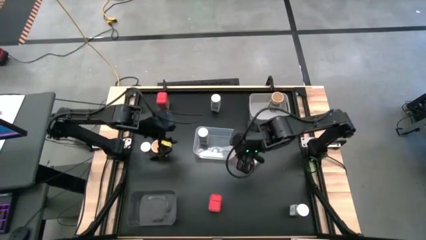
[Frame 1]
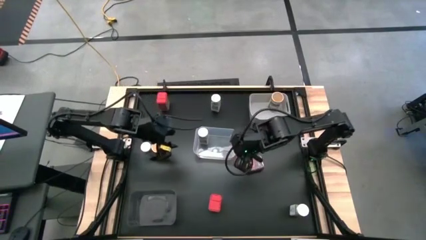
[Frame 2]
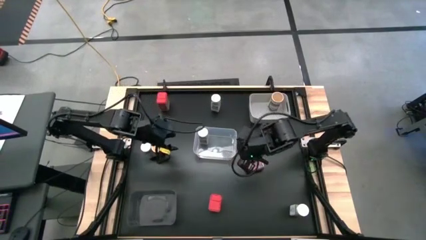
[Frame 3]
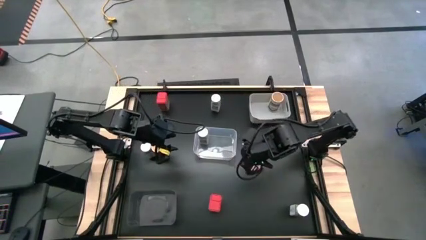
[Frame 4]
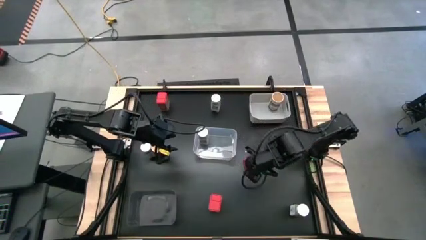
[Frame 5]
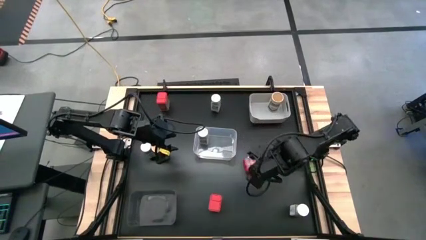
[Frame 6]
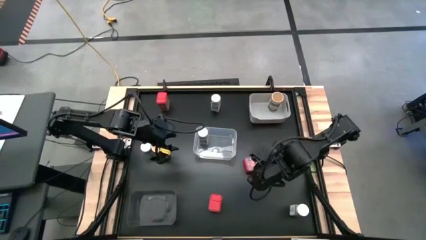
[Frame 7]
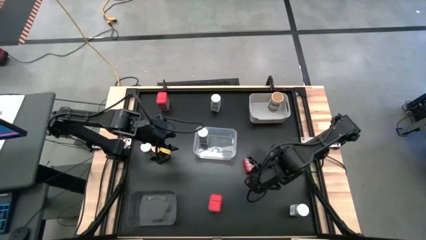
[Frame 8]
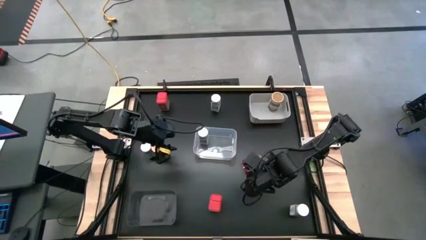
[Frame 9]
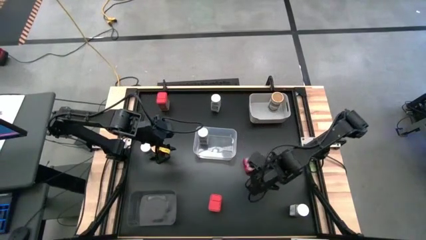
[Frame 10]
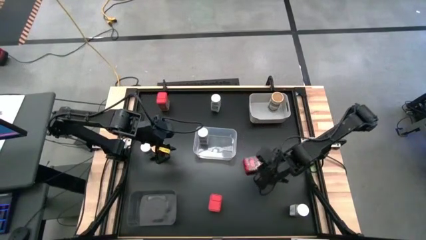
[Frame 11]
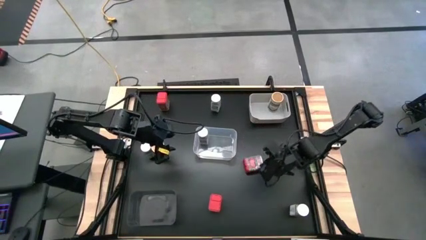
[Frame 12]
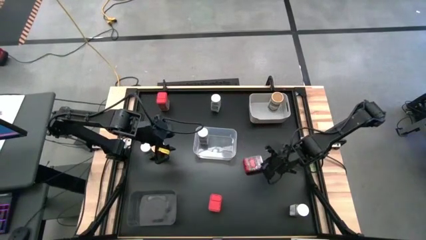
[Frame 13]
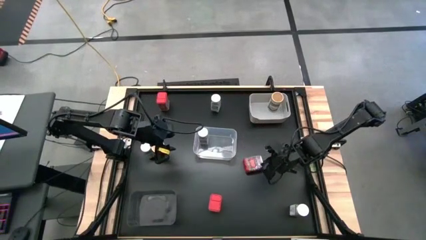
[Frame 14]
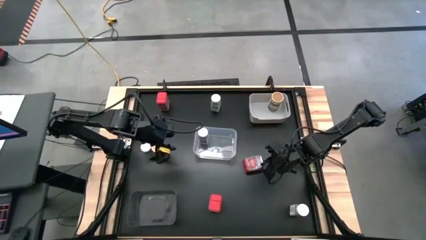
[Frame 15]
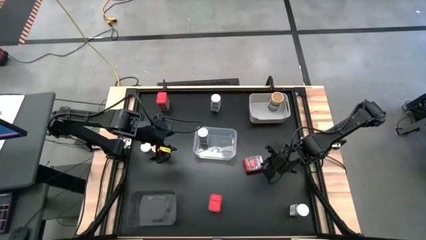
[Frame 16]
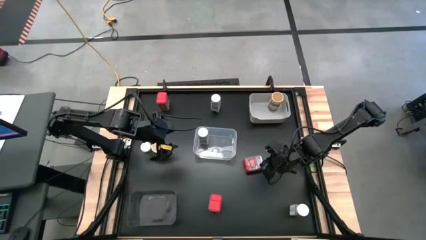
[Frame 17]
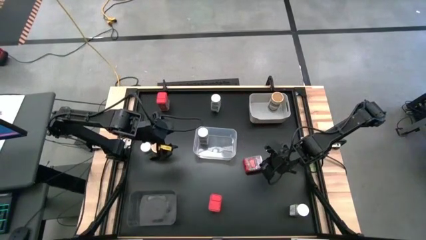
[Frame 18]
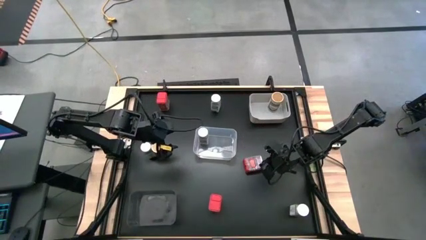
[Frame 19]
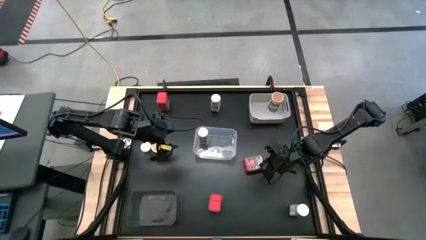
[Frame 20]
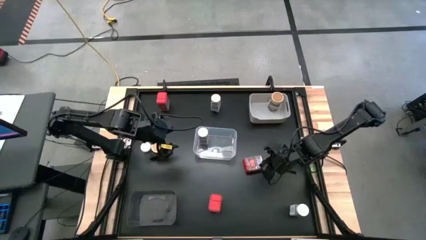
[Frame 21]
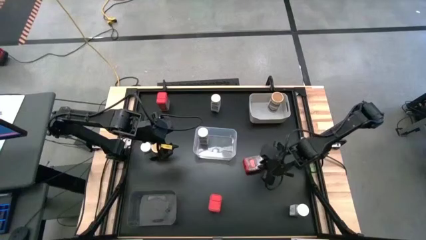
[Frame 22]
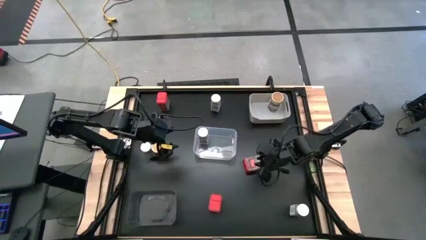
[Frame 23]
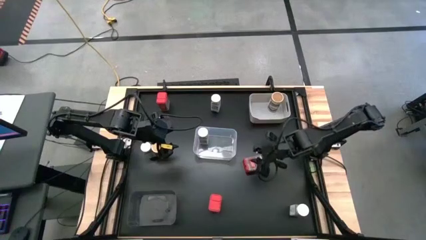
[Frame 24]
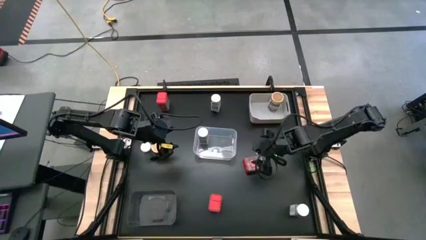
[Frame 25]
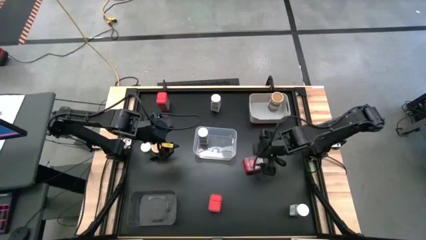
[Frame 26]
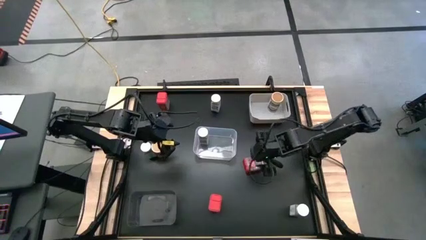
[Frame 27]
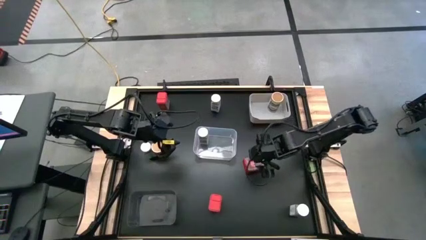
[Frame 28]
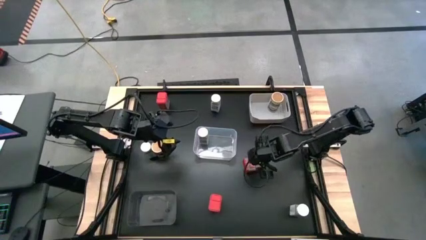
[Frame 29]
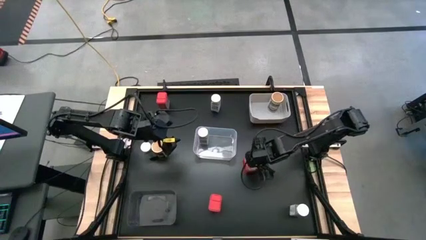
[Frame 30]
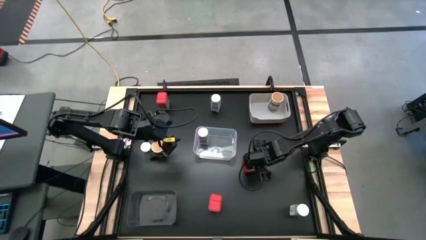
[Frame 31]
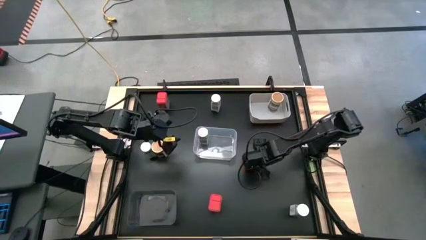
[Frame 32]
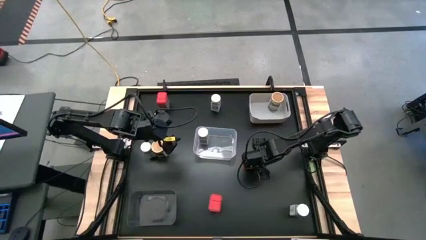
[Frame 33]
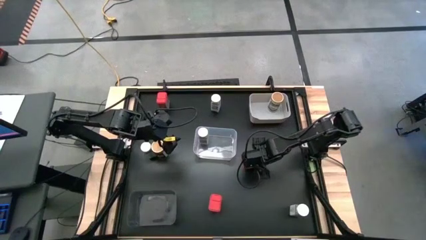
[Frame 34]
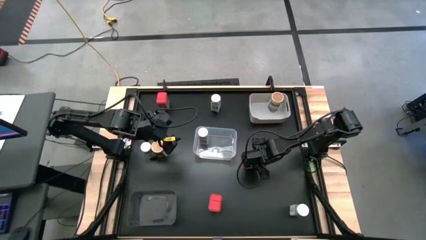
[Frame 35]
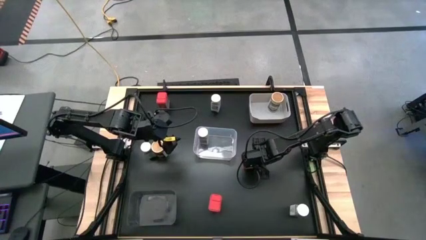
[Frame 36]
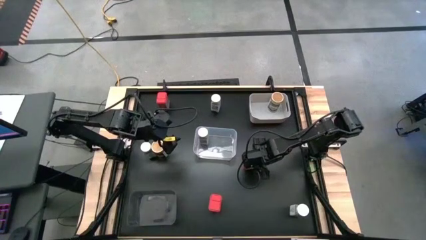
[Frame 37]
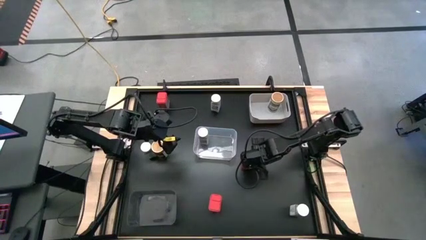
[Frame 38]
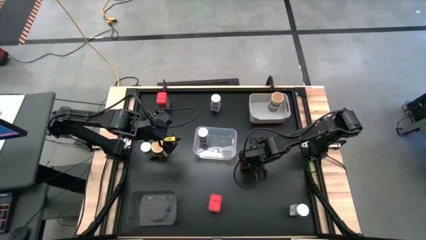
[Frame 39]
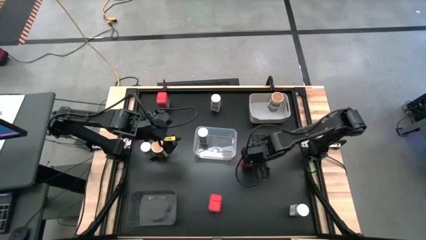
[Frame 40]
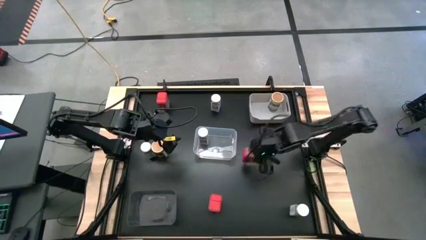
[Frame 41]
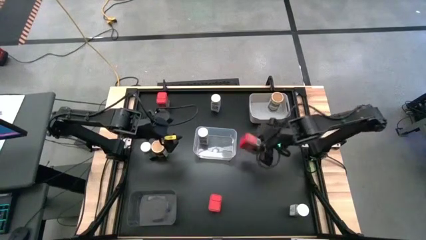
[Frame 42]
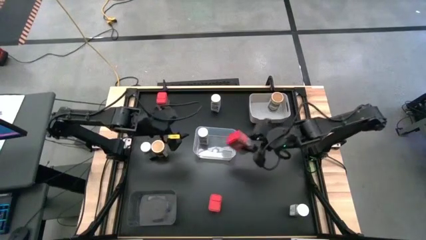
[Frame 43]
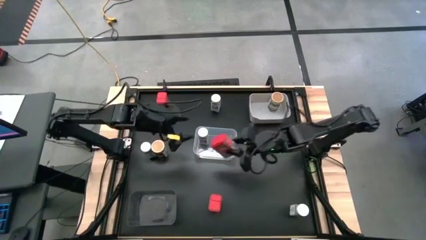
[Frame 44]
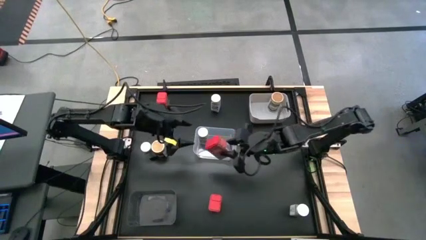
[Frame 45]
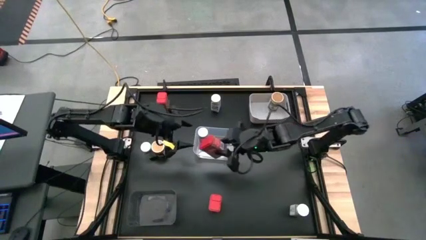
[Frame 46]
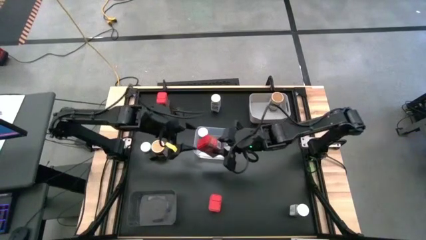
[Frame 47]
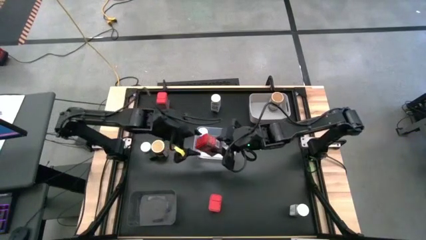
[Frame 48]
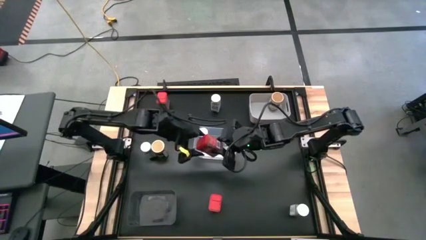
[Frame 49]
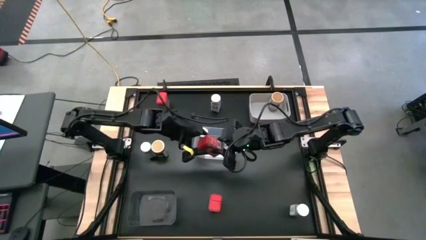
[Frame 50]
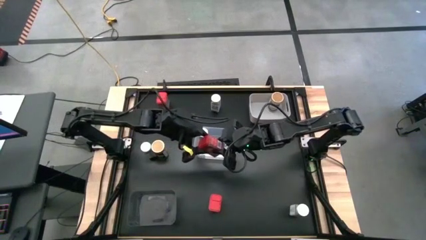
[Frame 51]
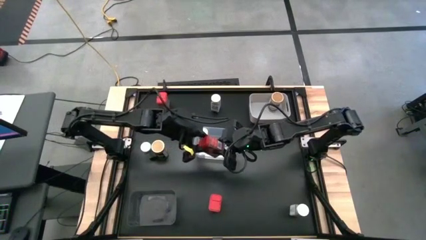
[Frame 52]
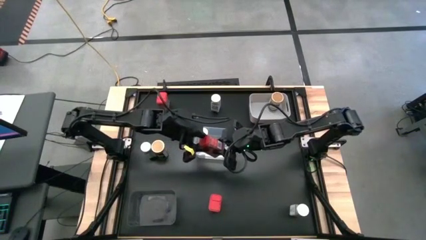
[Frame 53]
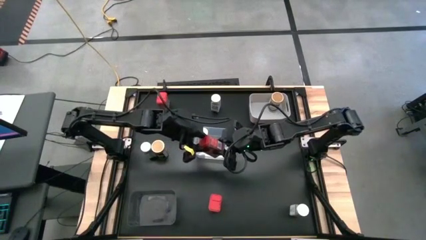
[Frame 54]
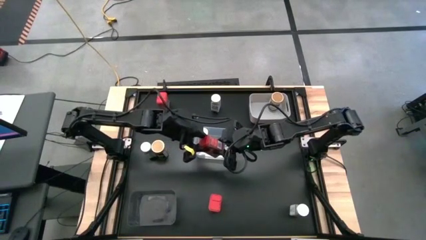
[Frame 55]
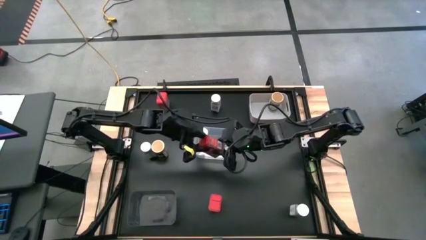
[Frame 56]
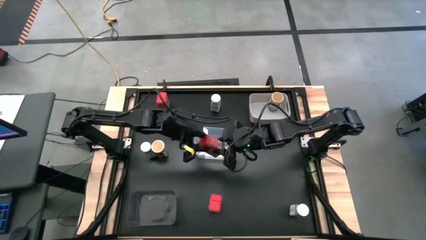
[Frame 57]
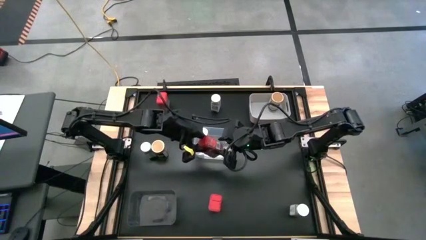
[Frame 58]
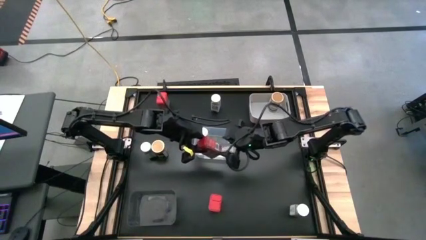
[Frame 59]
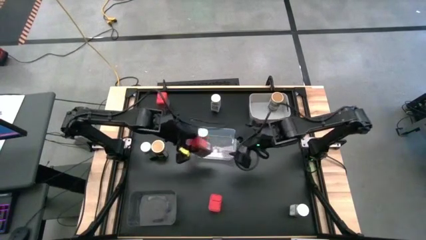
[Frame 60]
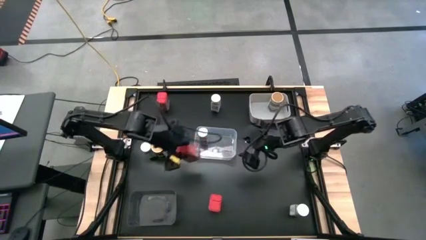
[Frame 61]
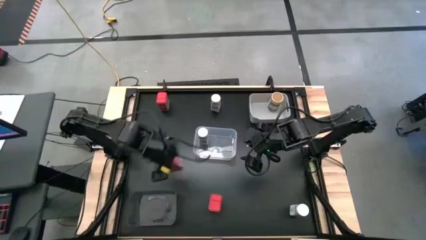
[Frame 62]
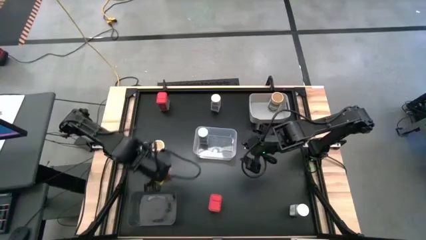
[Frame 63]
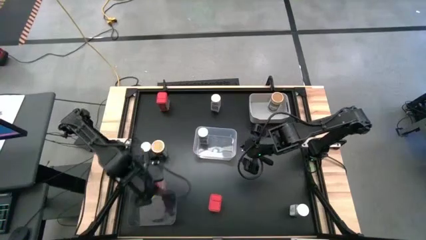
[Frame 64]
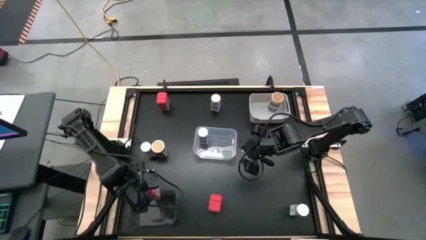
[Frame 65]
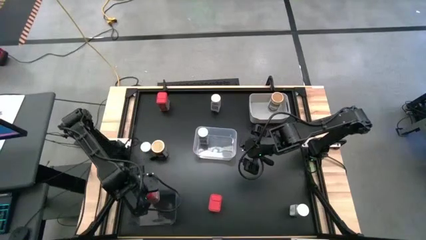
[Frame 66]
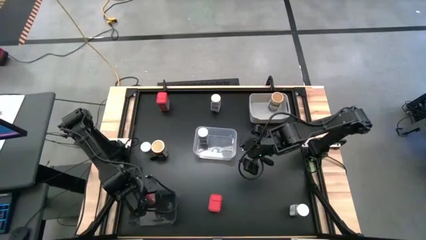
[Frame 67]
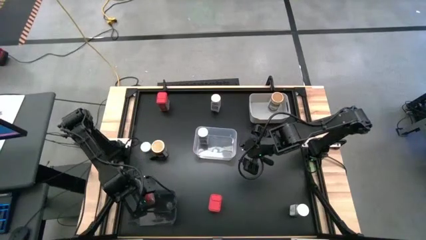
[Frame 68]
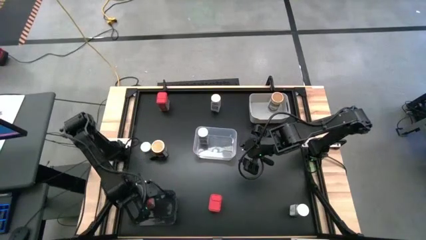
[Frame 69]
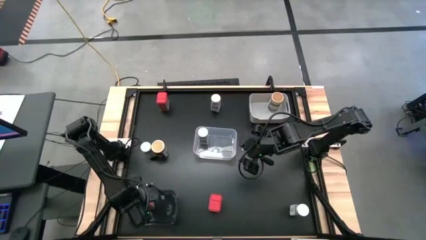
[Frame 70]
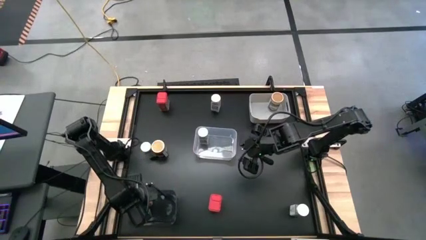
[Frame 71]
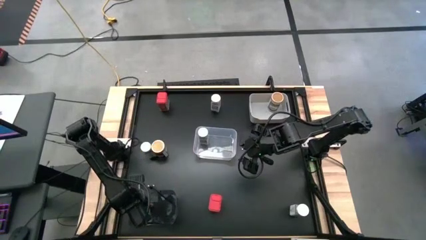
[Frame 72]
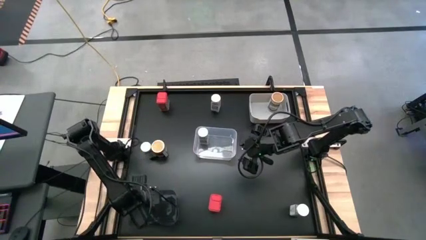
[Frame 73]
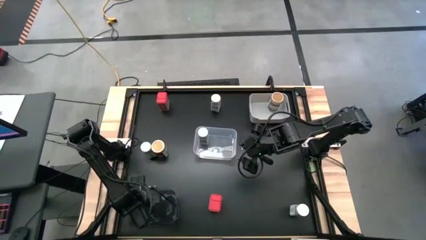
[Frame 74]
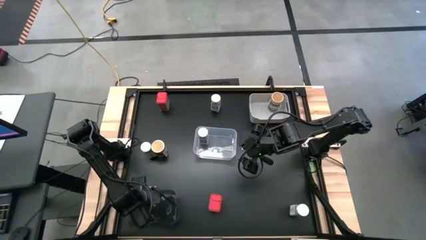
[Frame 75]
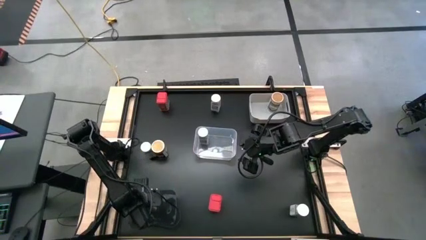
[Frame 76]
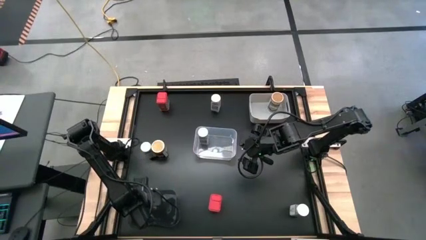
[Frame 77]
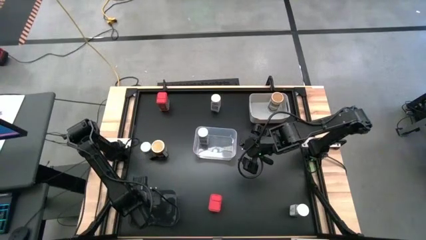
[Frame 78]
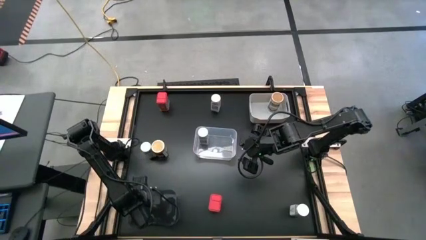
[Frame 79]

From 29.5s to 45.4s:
Task: Sort spices by type
Put the red seasoning can into the black bin
